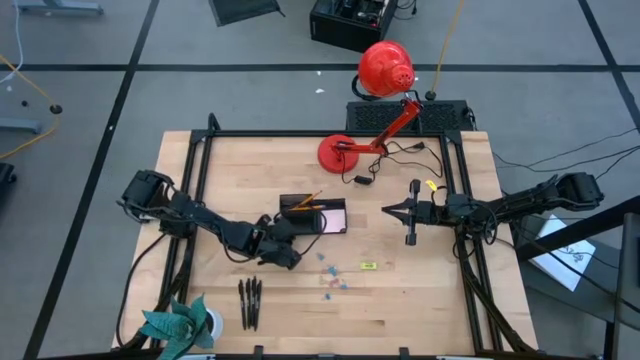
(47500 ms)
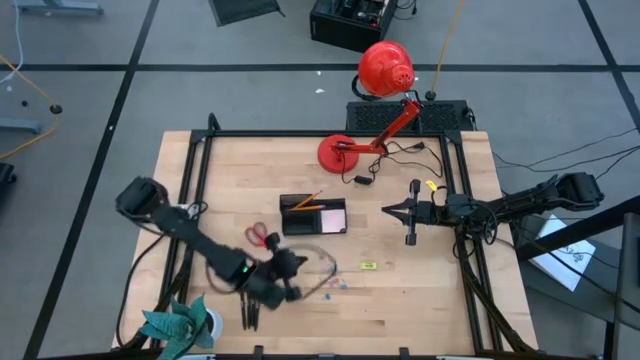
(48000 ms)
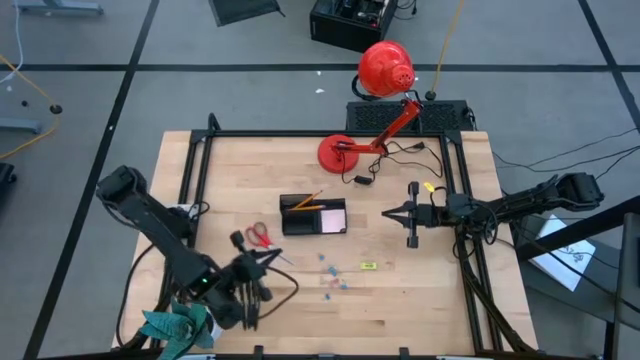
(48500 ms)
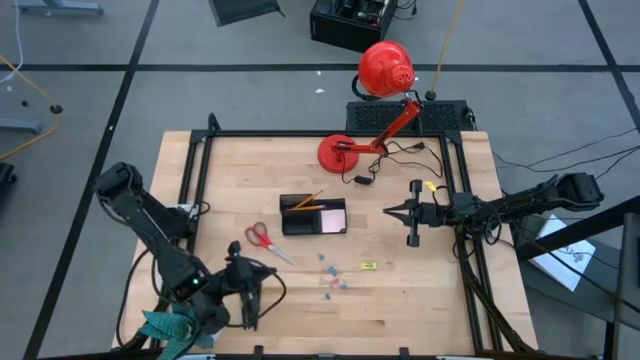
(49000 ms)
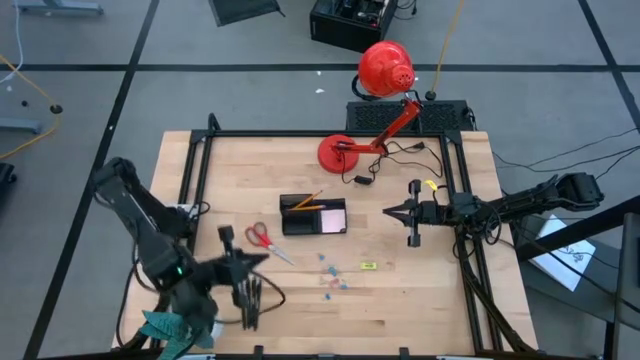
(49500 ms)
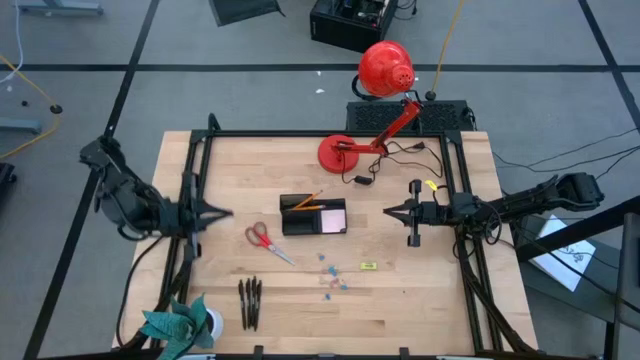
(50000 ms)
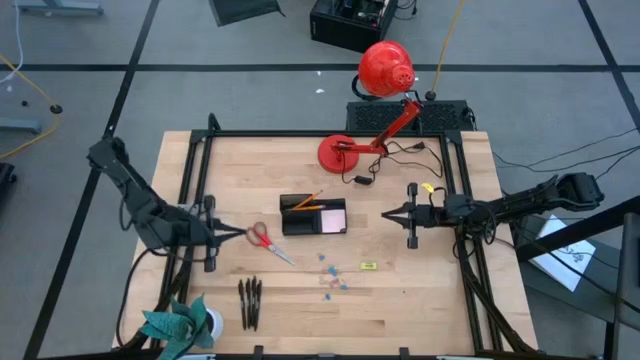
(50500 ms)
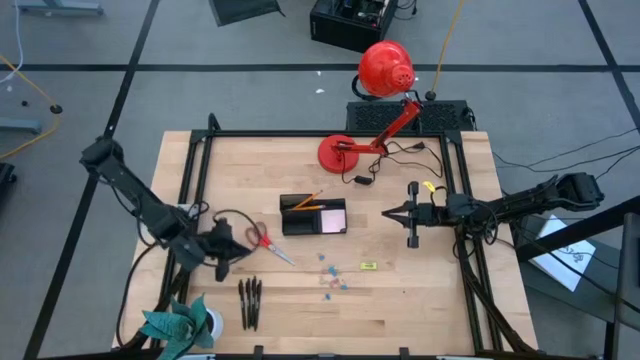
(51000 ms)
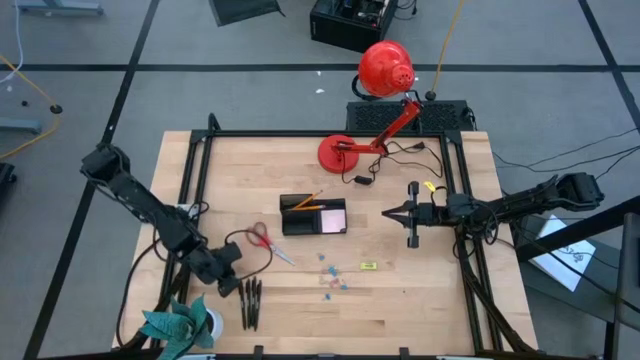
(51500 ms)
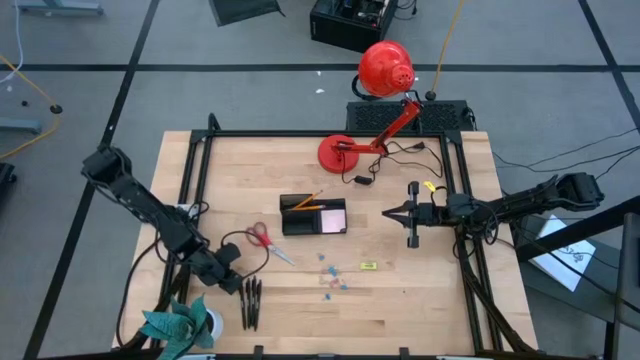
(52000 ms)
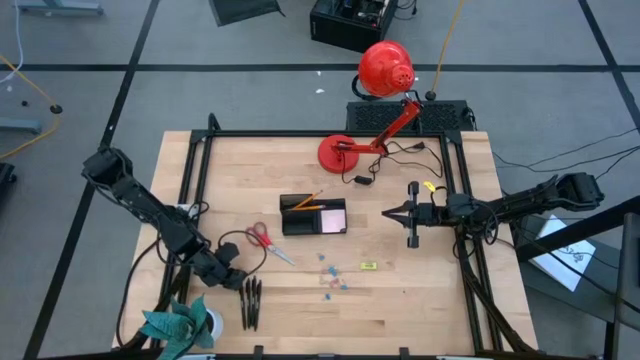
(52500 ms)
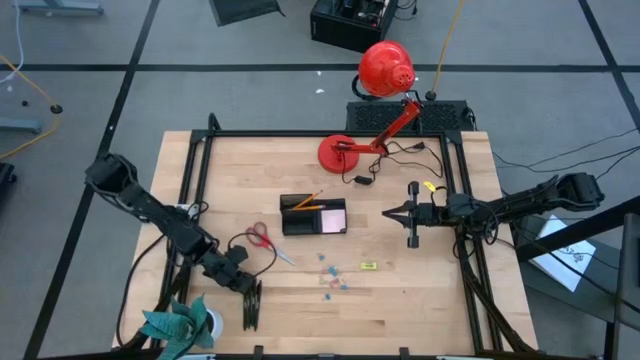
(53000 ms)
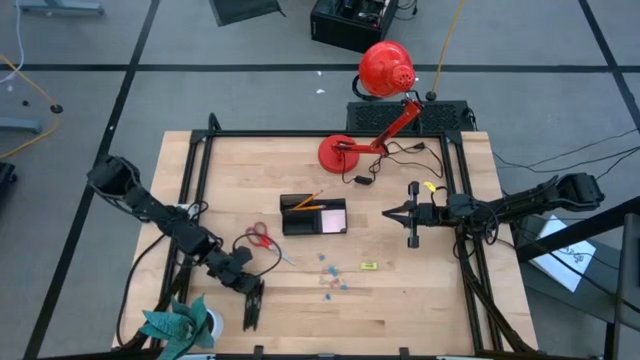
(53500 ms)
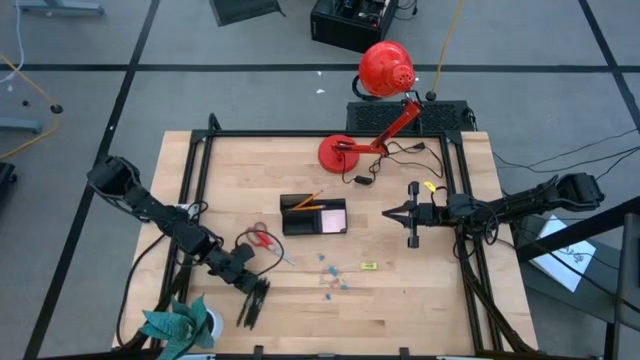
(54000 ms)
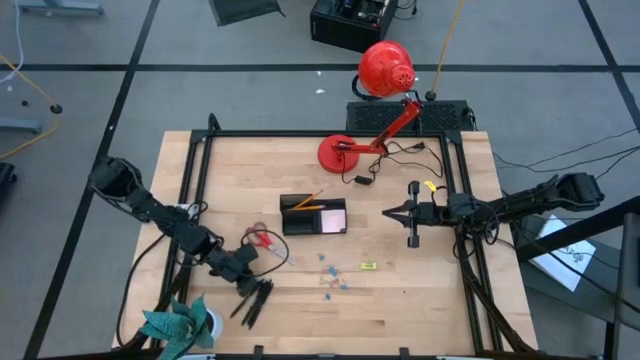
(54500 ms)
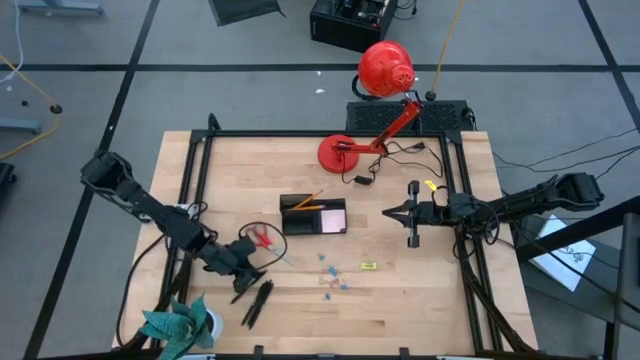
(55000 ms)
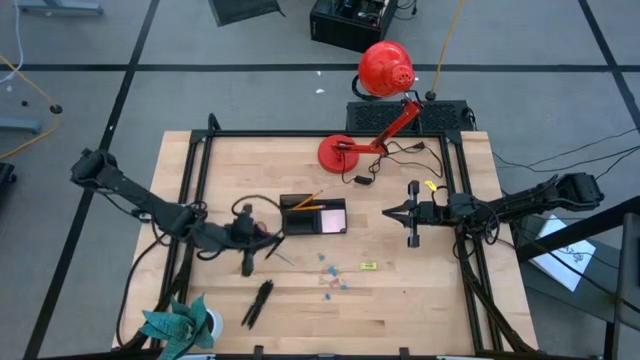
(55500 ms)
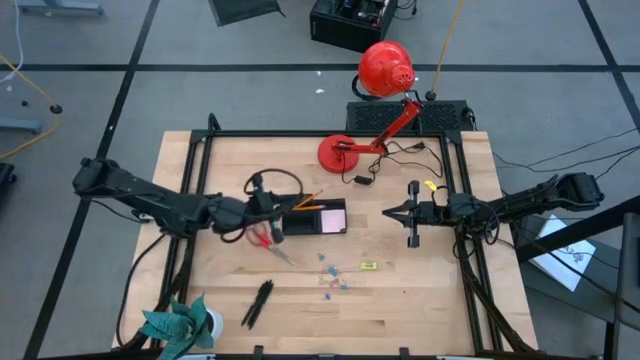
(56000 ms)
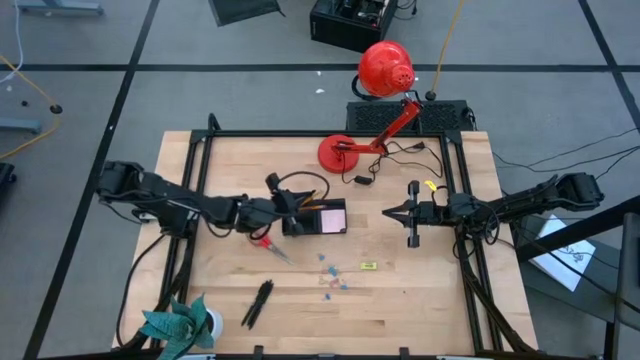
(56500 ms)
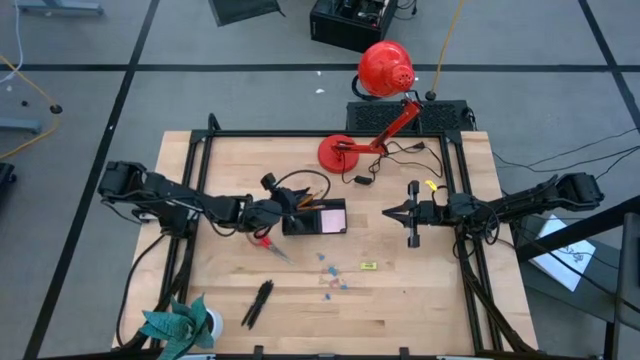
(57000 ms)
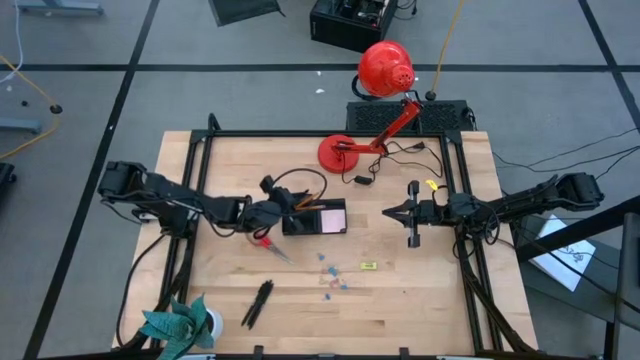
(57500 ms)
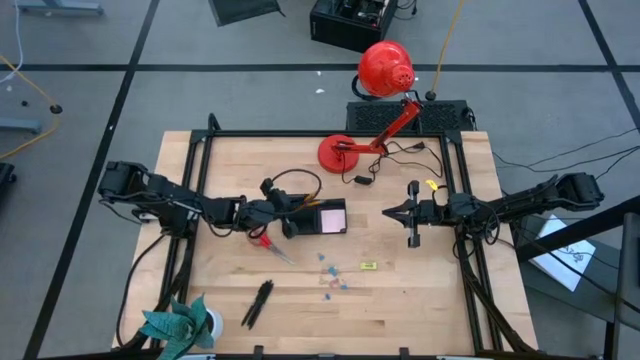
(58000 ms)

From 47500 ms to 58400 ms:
Task: Pick and place office supplies into organizer
Put the black pen into the mesh desk organizer

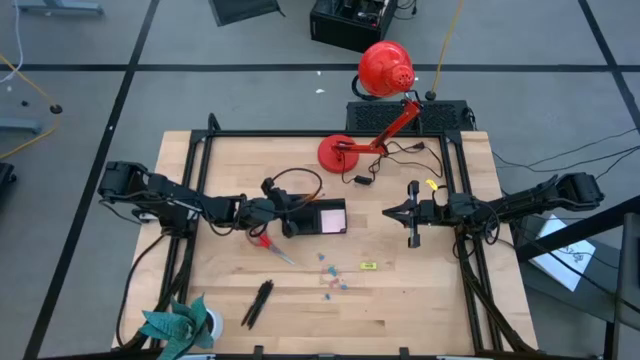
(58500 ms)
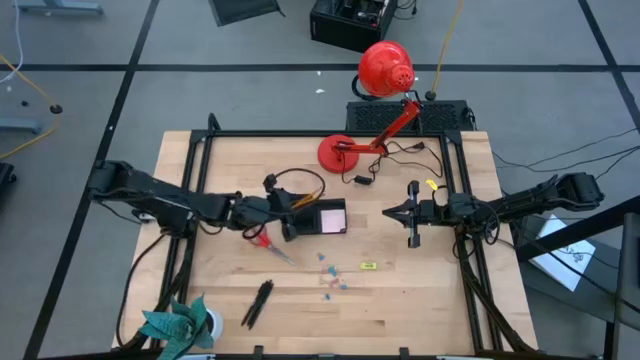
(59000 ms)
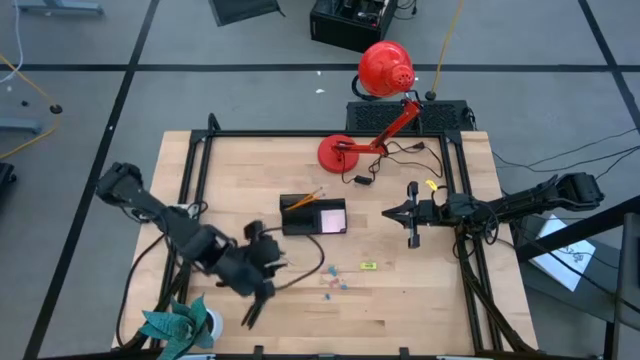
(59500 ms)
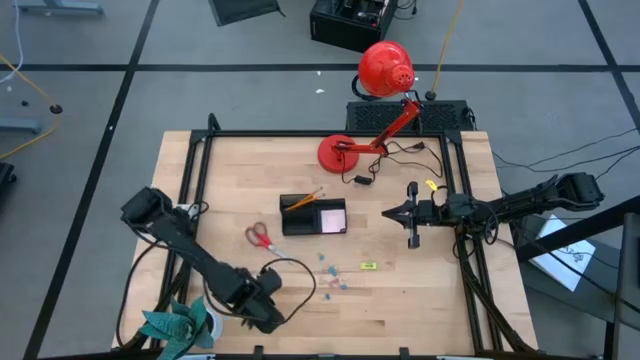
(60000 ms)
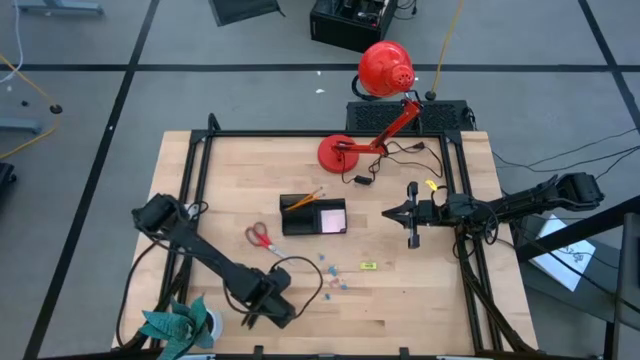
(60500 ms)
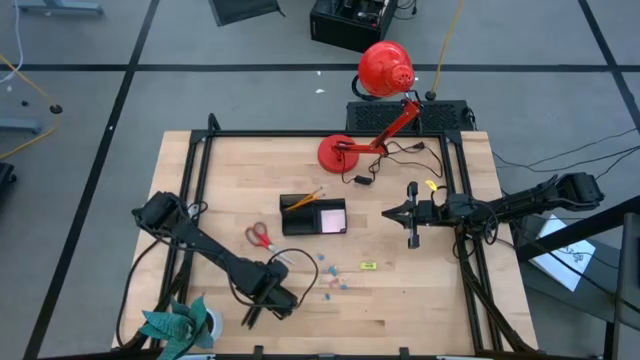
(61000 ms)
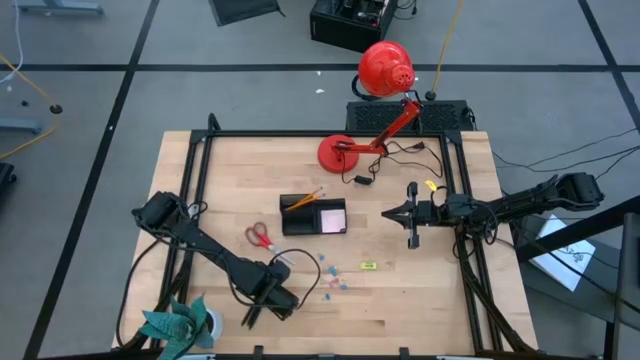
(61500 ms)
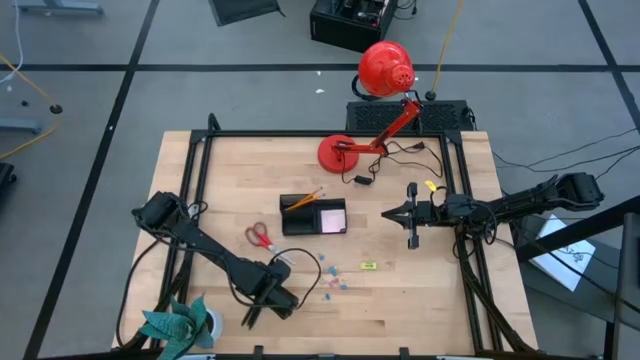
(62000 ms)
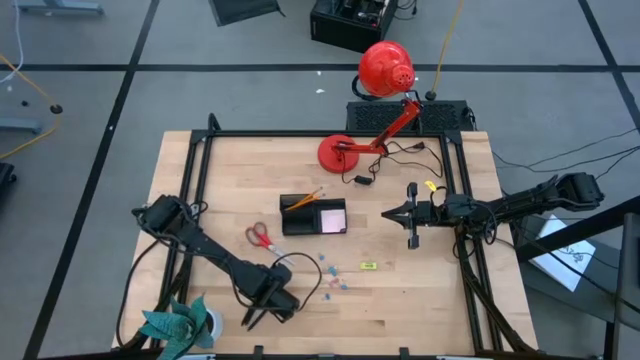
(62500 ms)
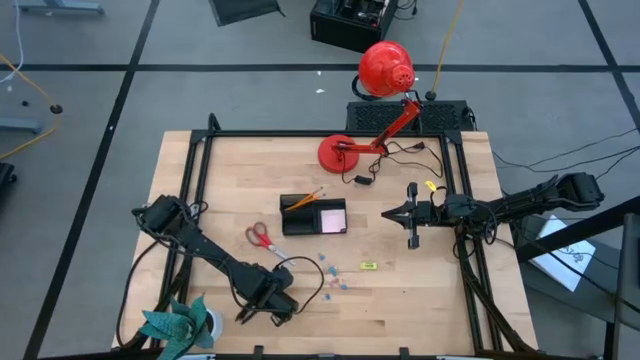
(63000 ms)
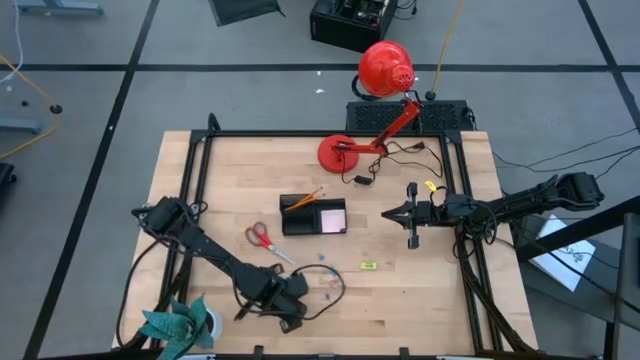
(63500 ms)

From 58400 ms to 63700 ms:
Put the black pen into the mesh desk organizer

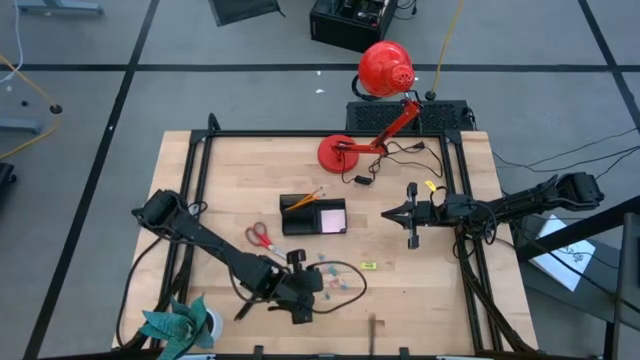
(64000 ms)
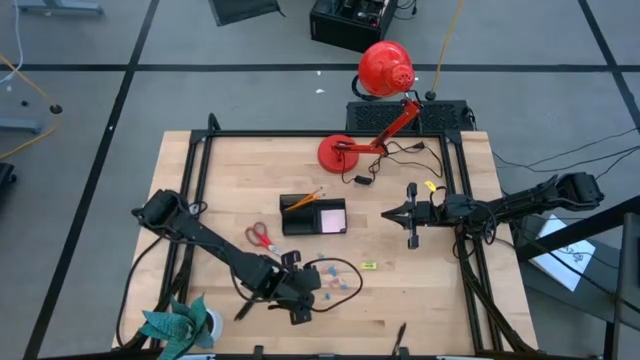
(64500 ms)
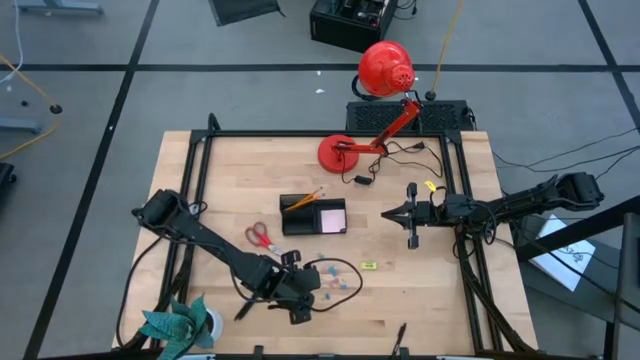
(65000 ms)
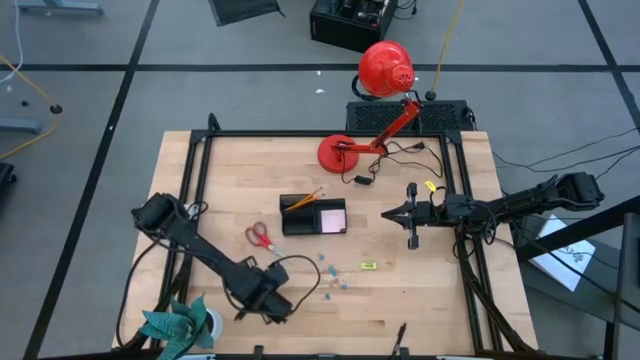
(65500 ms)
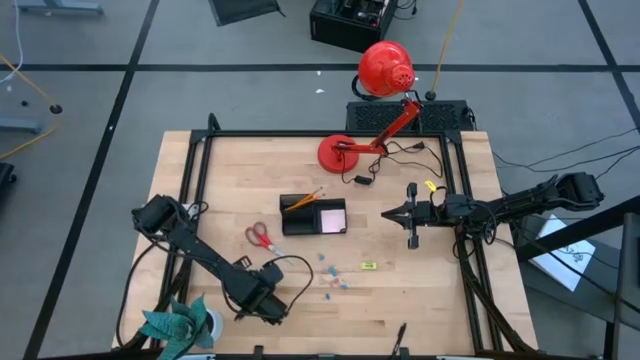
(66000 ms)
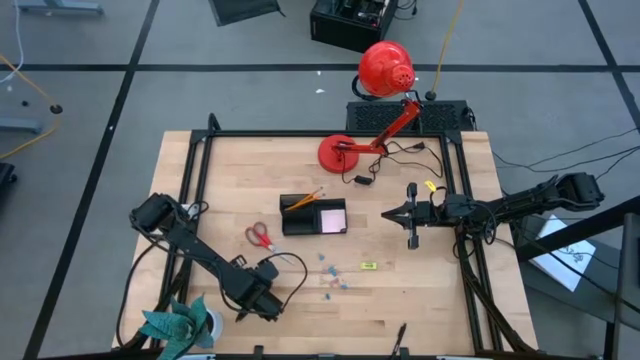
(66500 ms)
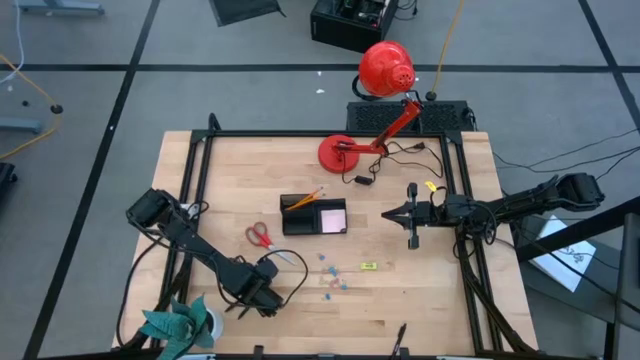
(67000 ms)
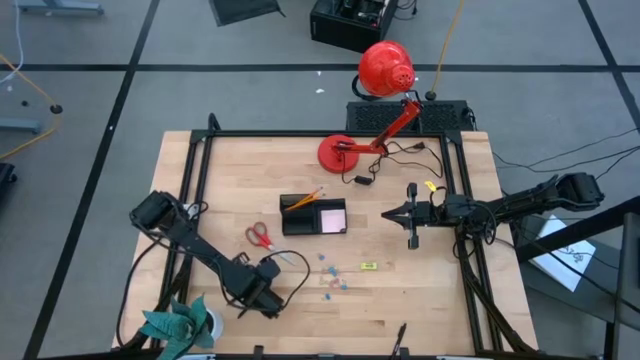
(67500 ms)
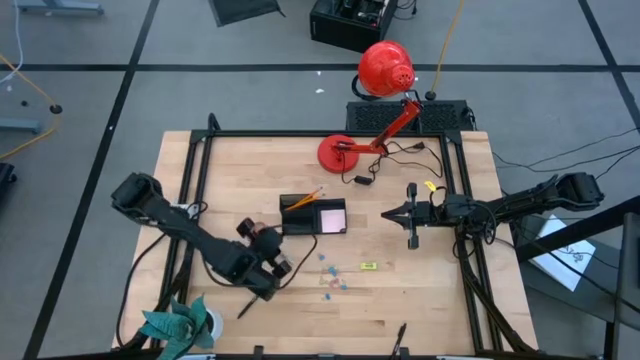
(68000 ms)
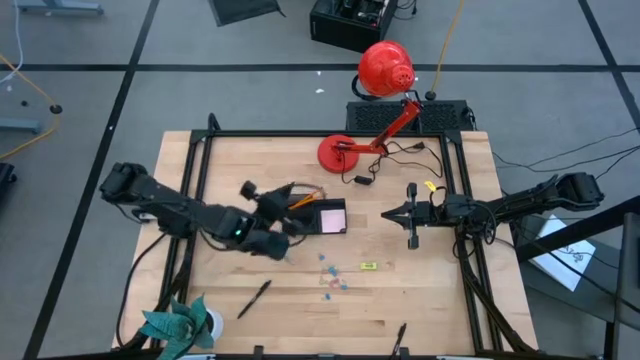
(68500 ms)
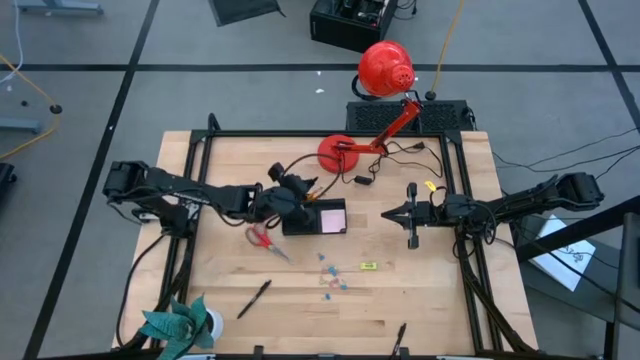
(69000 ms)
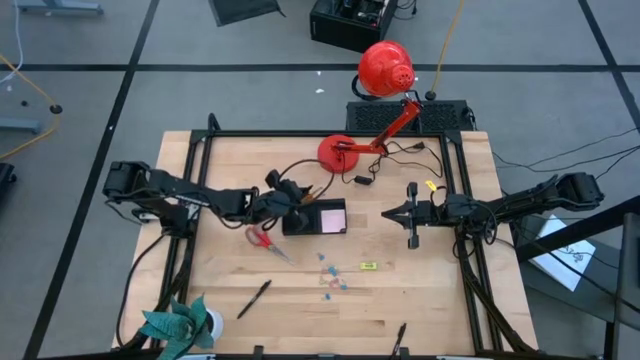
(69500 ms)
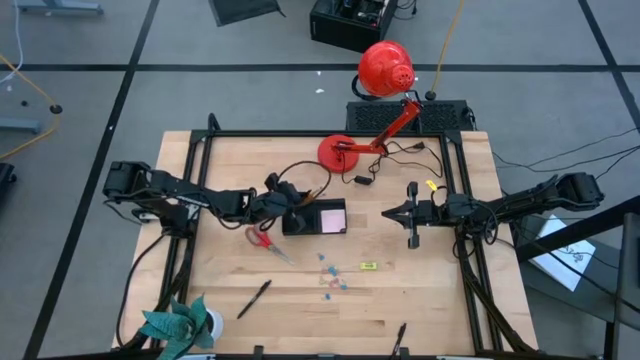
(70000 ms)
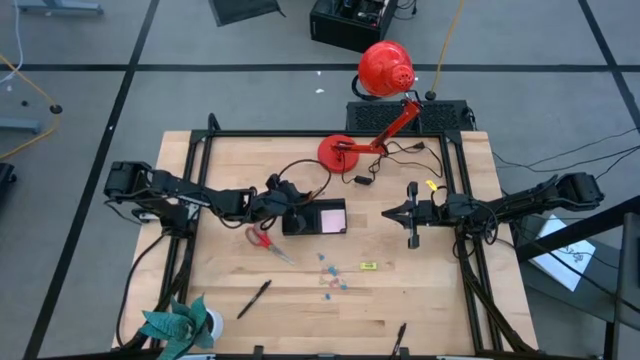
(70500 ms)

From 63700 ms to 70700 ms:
Put the black pen into the mesh desk organizer
